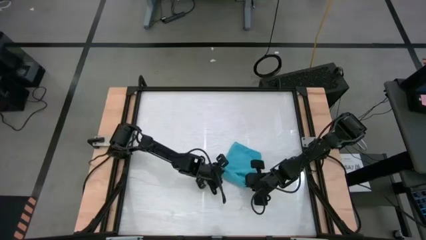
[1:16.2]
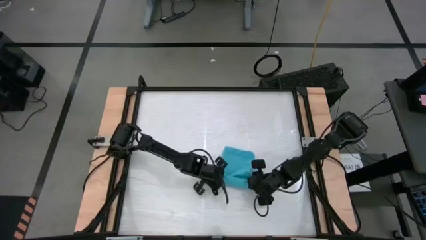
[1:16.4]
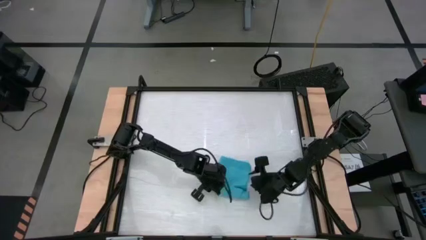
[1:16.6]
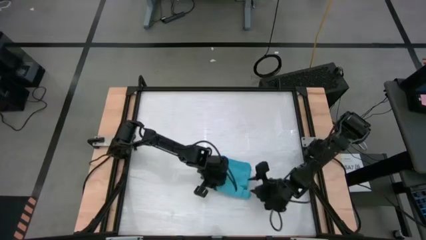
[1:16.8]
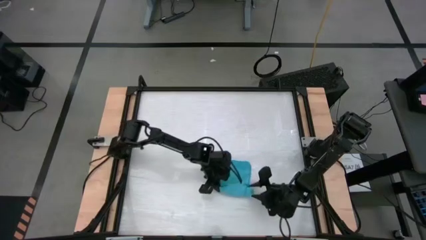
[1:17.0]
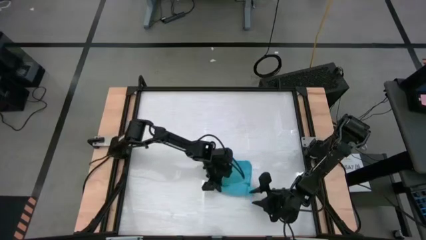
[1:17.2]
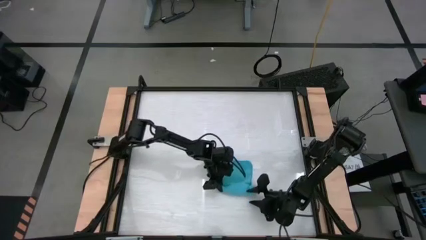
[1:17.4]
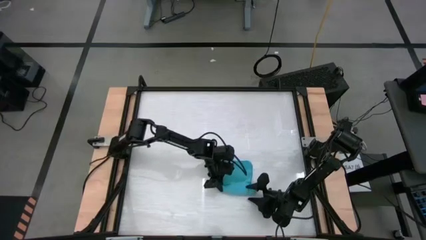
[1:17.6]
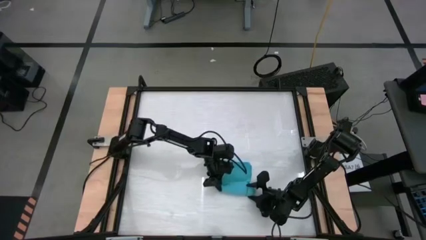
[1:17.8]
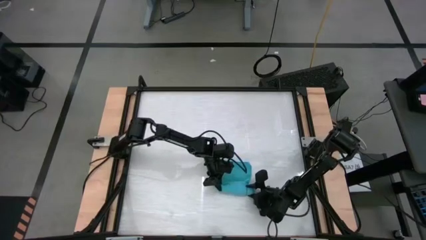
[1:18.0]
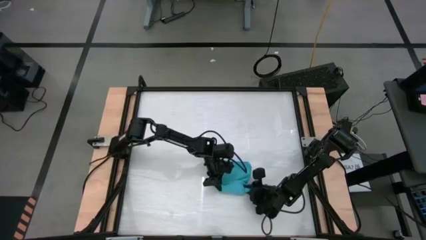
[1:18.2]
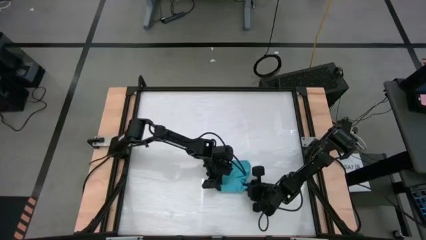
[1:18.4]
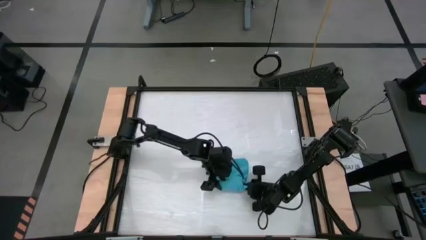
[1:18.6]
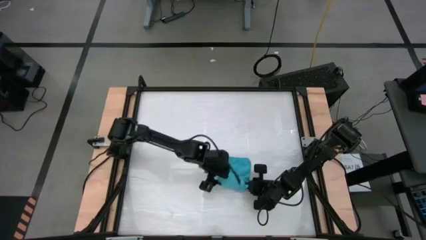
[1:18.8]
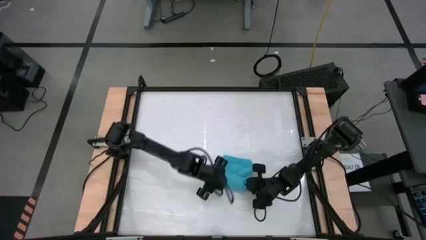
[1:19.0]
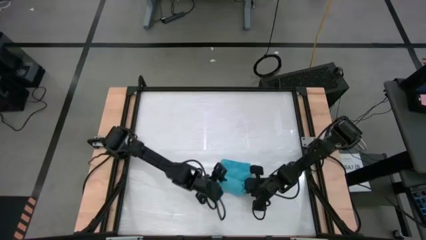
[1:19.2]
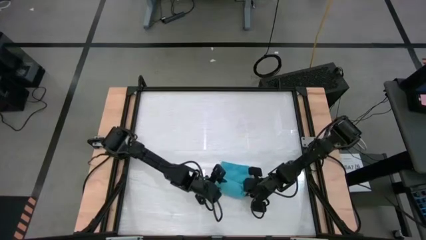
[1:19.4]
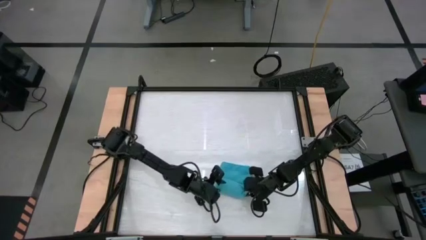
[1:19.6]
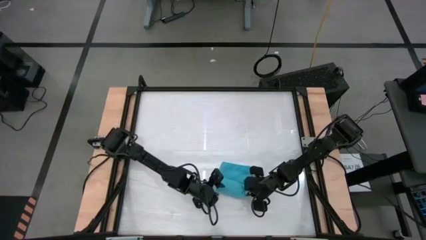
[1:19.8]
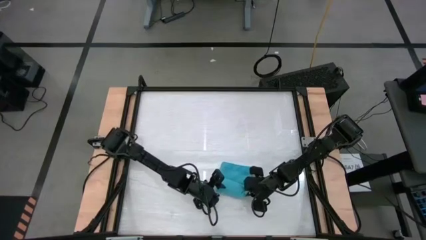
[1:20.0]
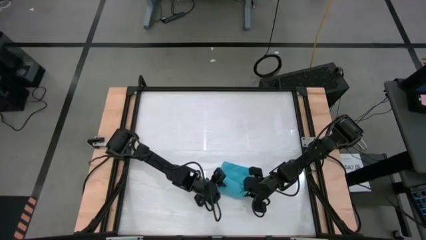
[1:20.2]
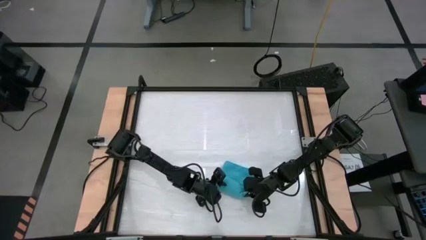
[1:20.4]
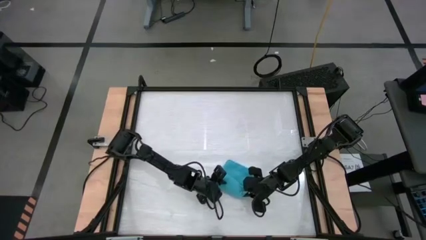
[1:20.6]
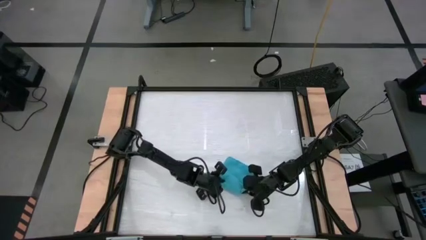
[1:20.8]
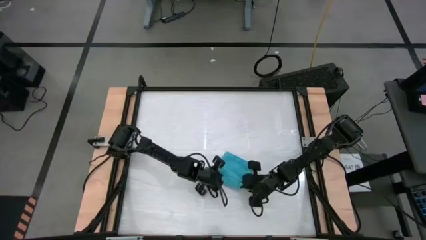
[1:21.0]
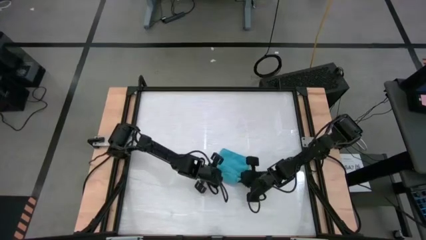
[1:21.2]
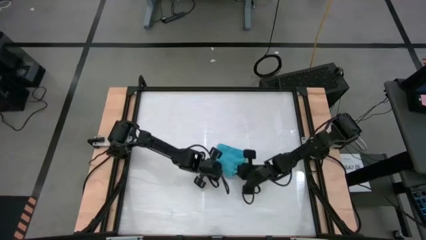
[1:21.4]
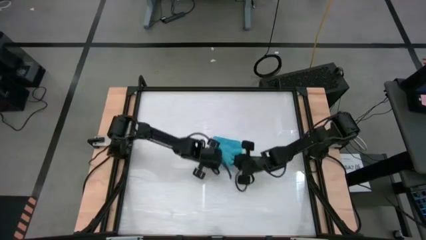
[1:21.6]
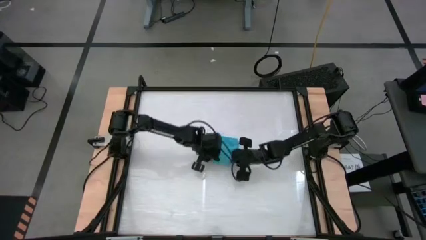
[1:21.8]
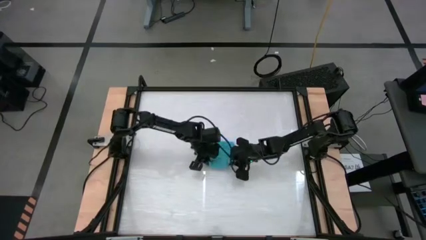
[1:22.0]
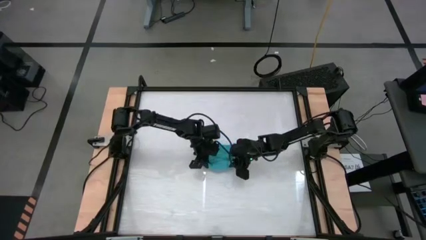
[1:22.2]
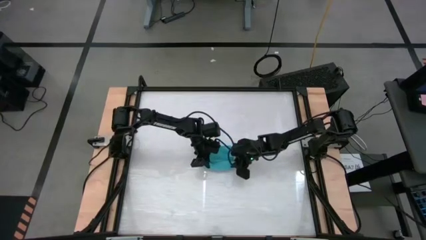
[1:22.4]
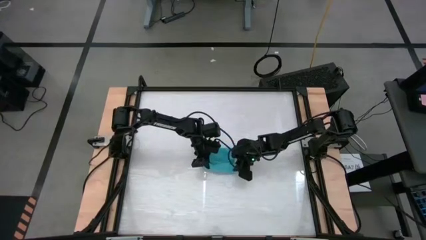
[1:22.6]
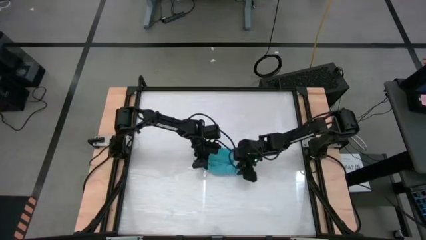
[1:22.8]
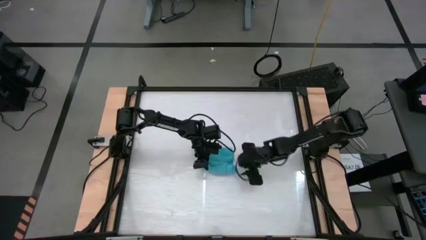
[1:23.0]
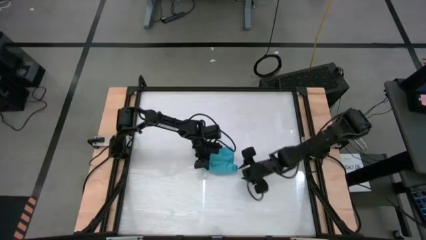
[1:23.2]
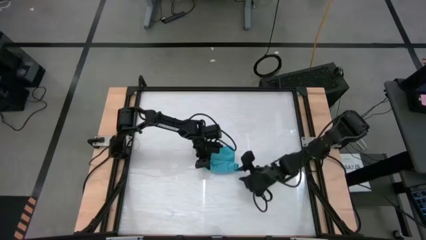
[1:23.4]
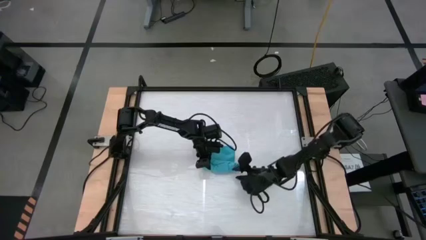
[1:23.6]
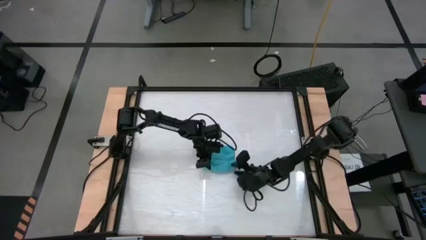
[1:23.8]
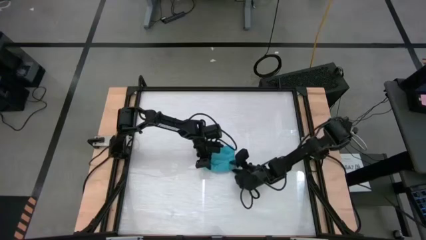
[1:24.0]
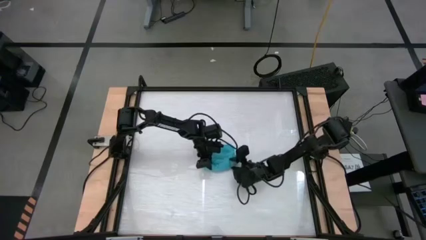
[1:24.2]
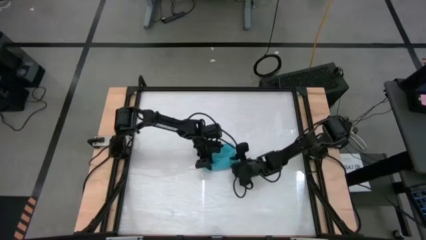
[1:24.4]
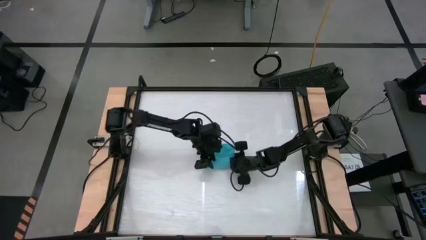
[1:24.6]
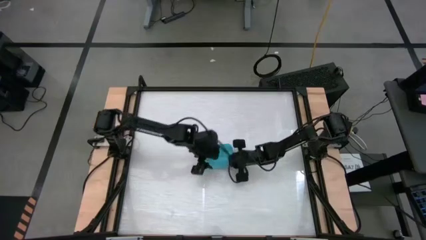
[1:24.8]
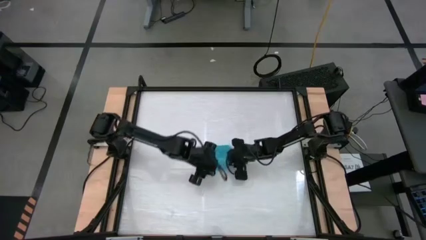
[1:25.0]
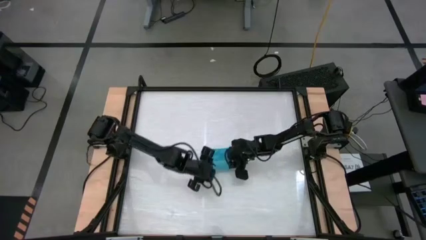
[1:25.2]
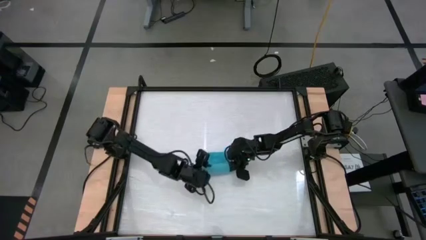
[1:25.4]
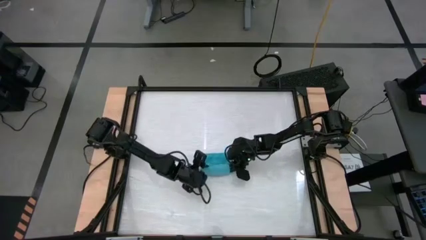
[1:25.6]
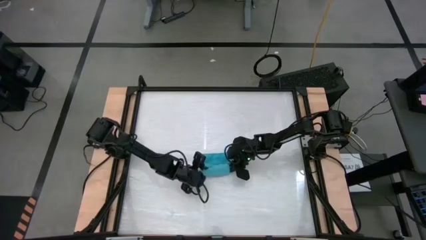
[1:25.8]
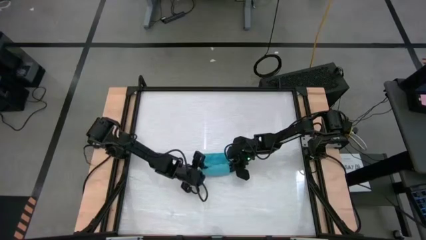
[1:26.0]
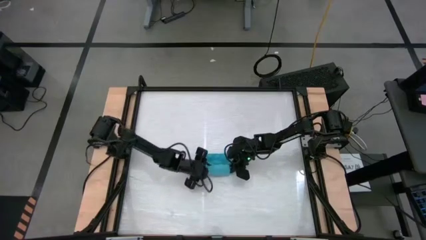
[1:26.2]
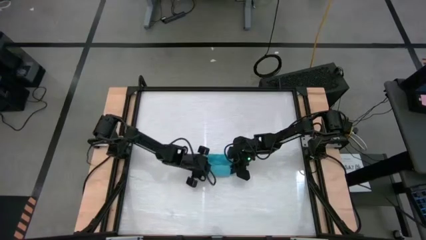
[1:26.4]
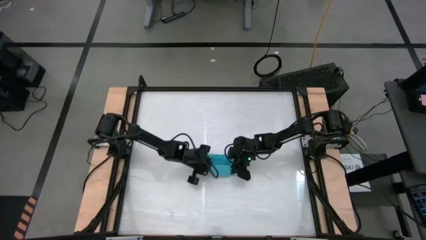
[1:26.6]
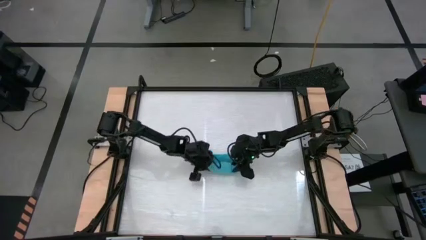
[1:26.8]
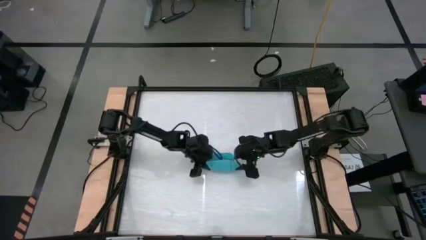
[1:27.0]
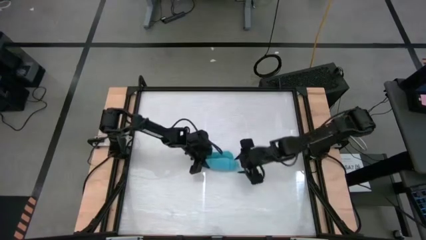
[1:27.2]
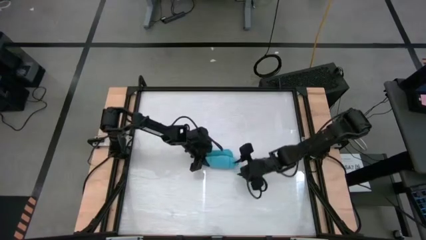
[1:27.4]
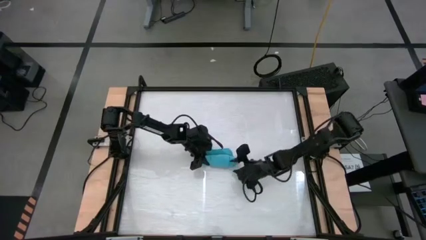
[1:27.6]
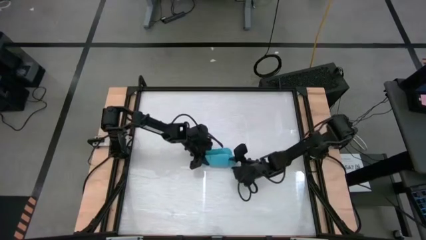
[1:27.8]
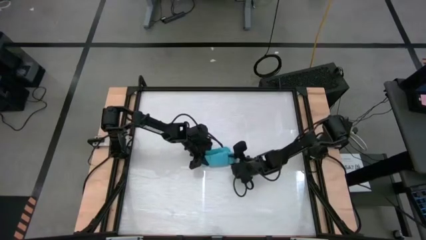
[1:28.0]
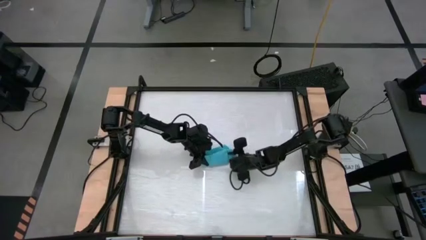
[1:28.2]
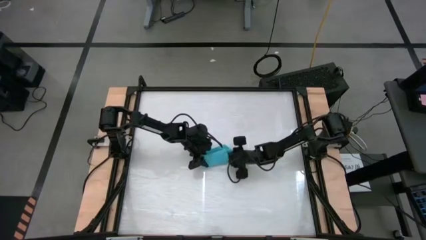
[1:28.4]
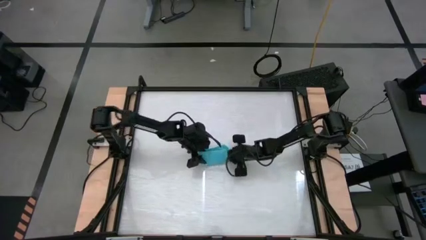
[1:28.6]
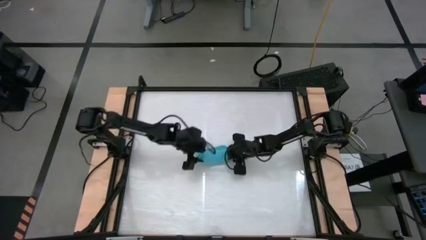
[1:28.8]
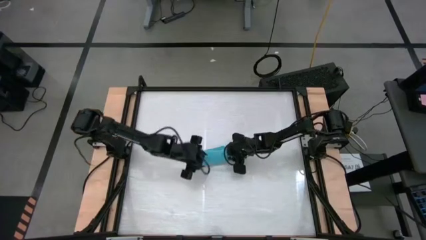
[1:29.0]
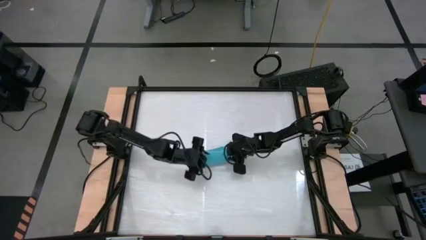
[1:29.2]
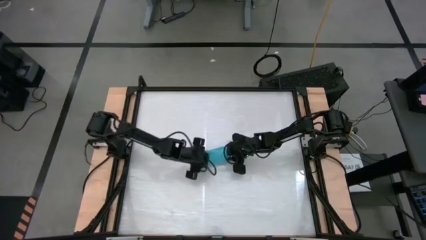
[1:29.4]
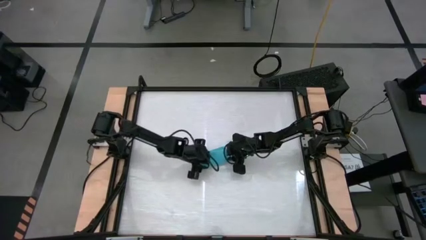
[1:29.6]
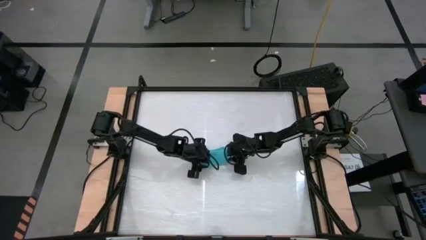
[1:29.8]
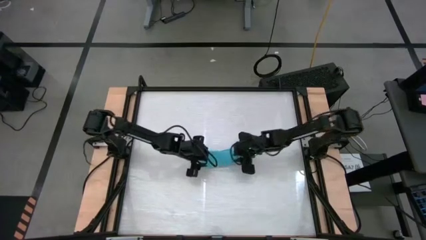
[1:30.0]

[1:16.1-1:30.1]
Task: Roll towel
Roll the blue towel

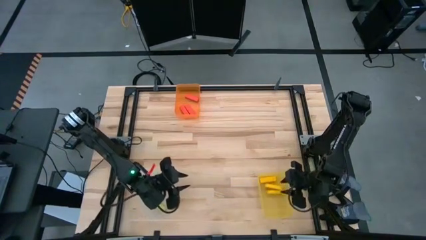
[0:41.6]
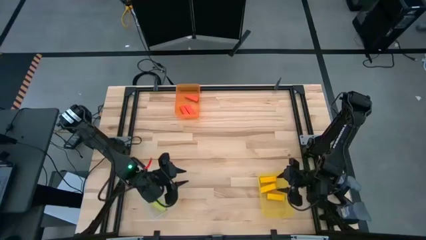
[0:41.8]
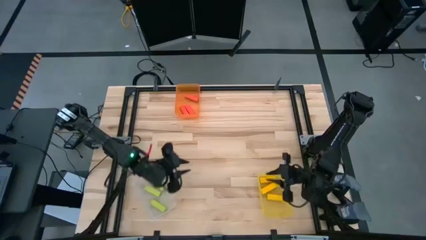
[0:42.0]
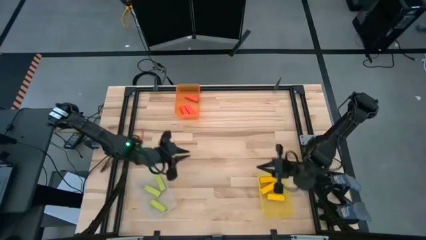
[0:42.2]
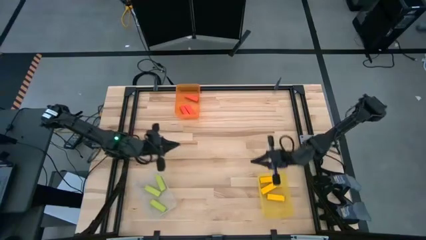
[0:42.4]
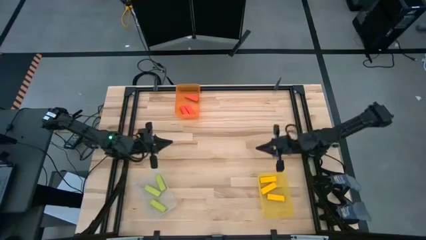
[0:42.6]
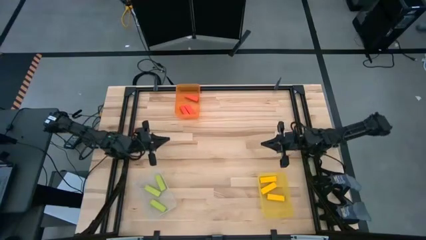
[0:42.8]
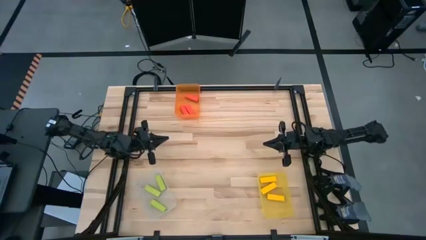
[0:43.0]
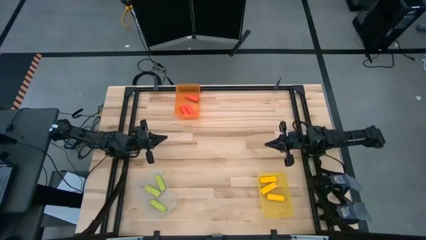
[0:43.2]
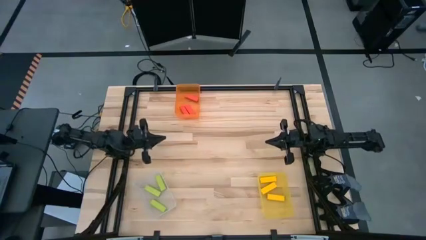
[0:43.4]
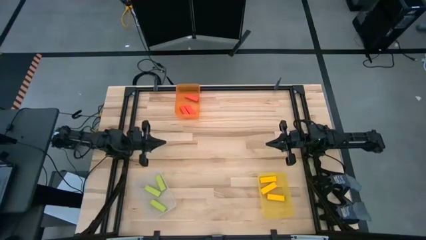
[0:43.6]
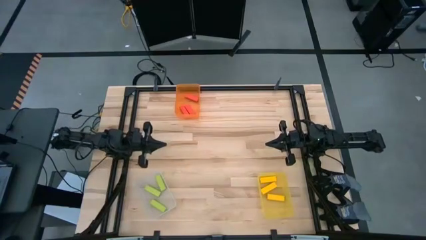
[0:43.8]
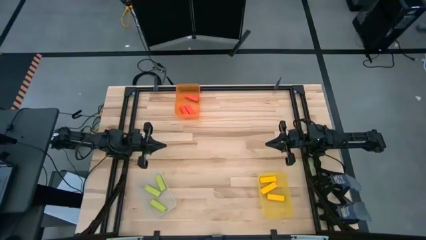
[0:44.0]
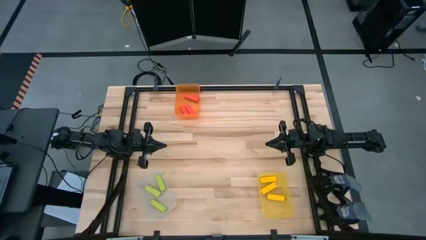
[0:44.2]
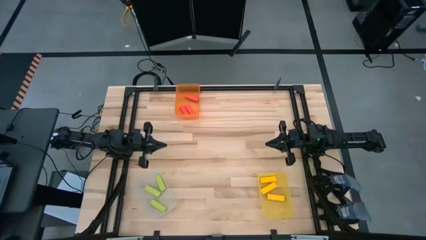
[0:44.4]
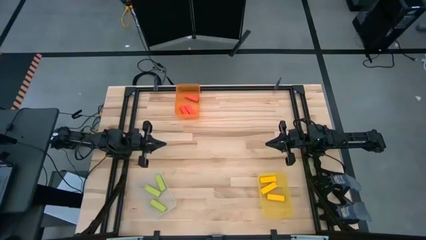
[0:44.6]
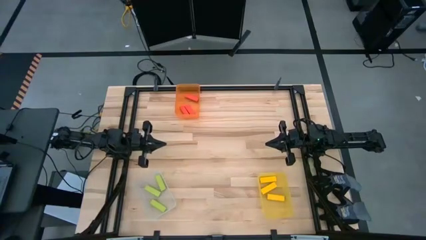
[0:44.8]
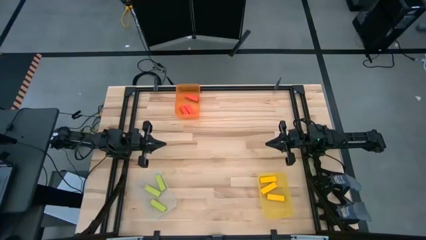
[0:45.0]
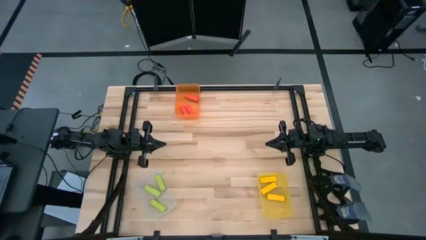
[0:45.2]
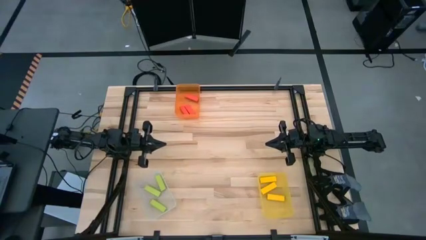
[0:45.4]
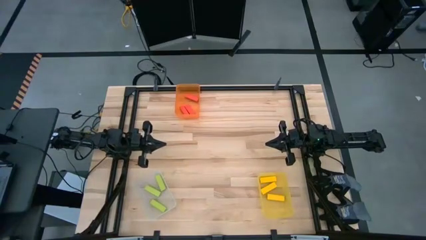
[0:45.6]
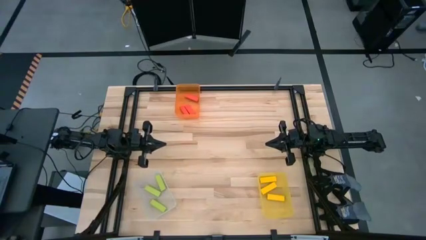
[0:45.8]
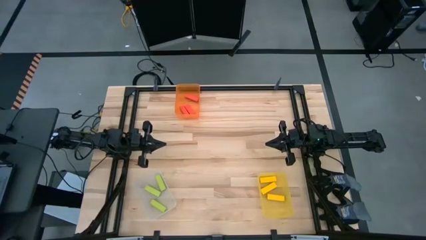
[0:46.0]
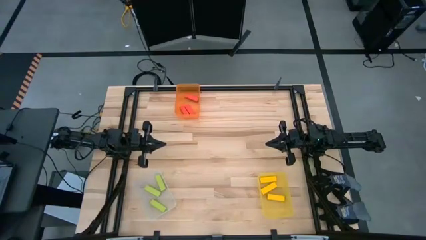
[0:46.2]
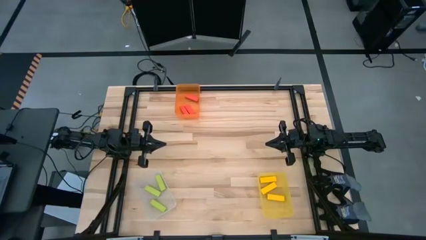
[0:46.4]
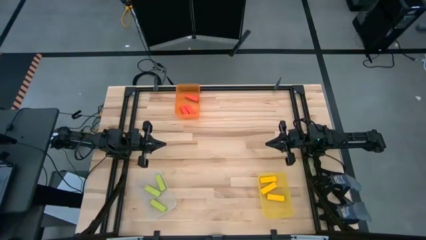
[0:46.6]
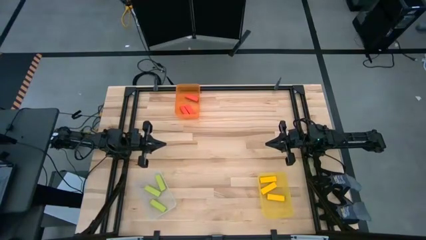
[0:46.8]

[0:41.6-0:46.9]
Task: Sort blocks
Return to Home Position
